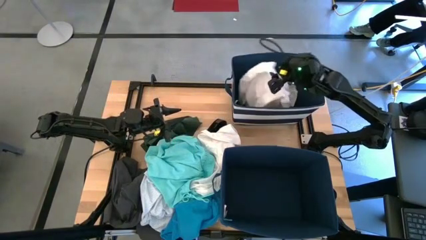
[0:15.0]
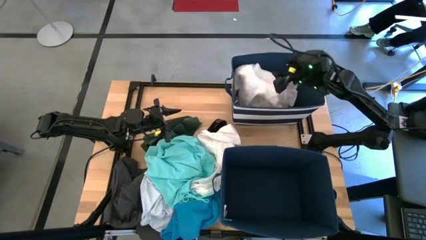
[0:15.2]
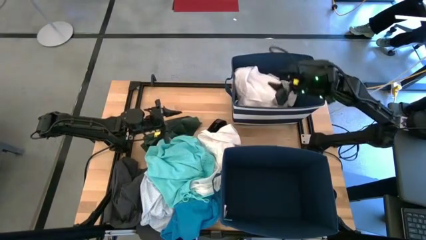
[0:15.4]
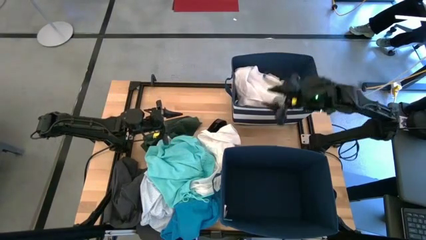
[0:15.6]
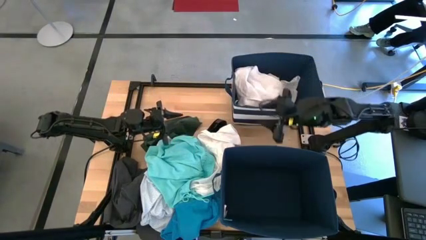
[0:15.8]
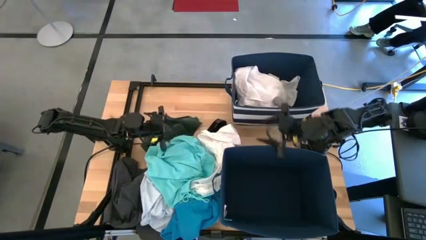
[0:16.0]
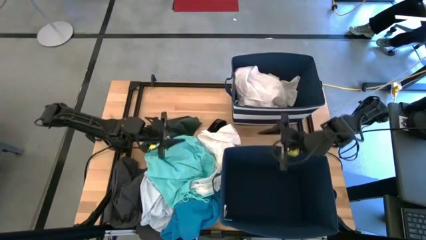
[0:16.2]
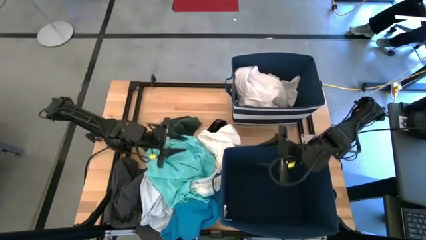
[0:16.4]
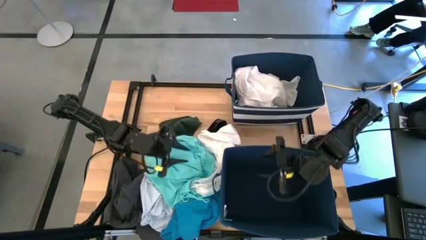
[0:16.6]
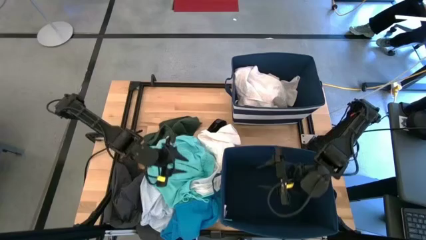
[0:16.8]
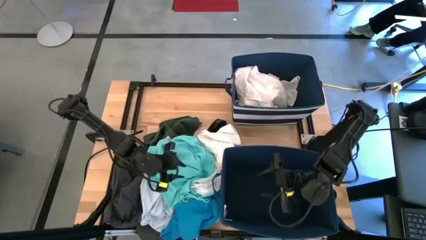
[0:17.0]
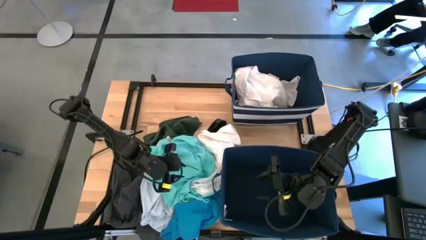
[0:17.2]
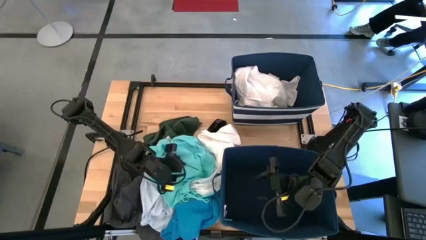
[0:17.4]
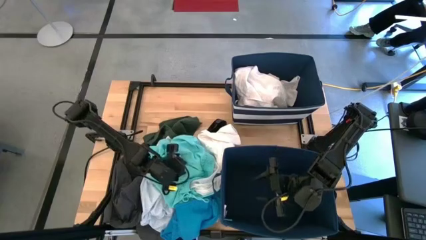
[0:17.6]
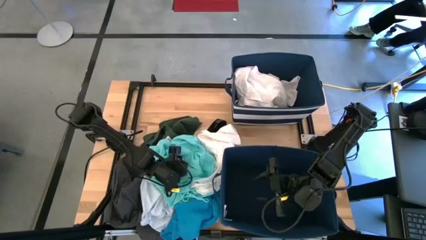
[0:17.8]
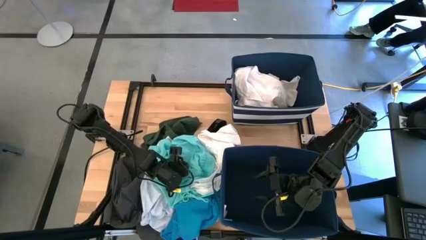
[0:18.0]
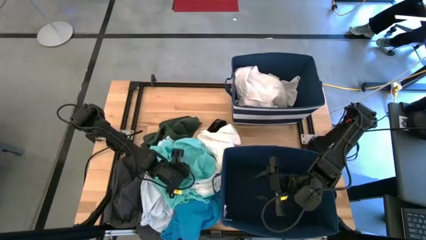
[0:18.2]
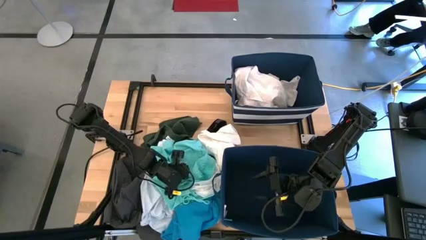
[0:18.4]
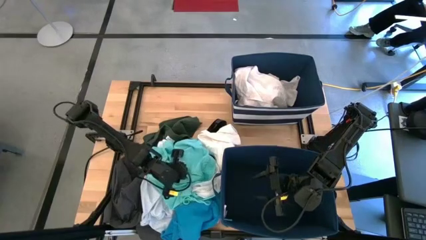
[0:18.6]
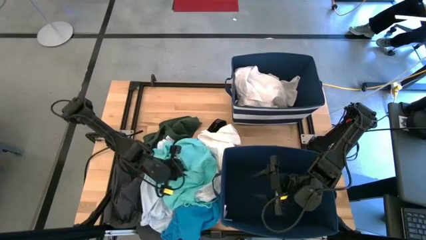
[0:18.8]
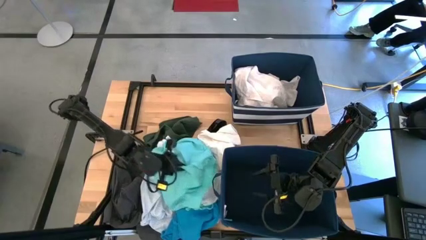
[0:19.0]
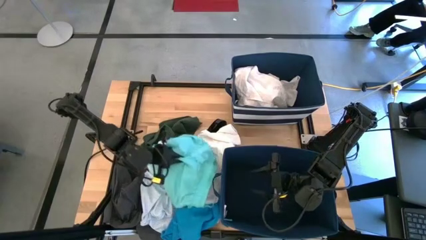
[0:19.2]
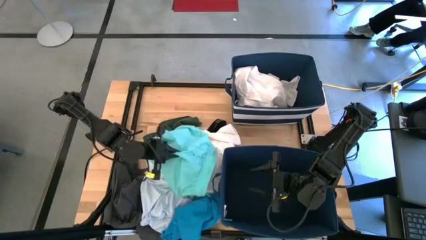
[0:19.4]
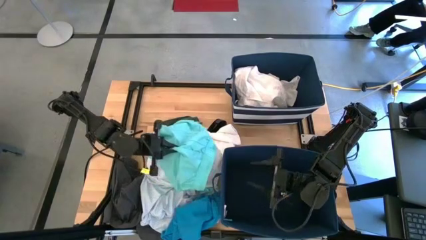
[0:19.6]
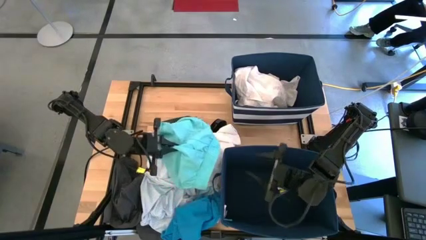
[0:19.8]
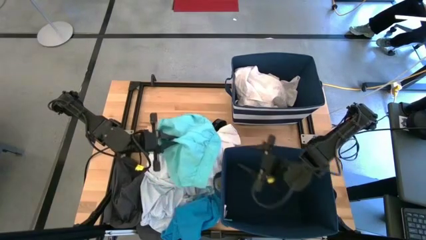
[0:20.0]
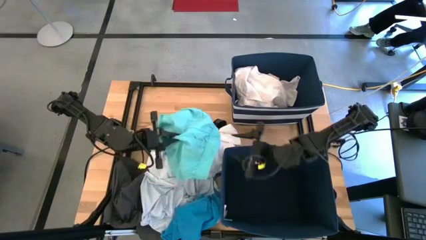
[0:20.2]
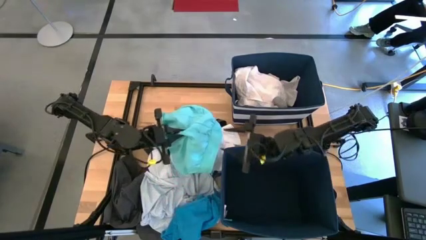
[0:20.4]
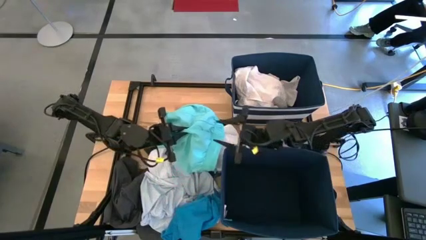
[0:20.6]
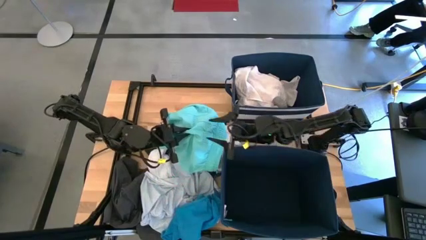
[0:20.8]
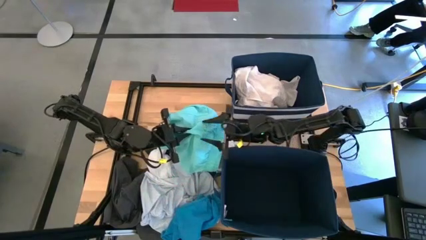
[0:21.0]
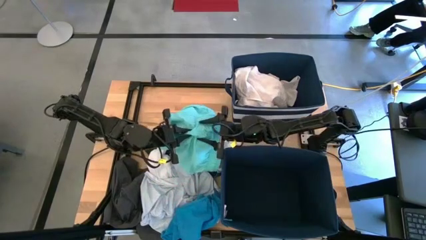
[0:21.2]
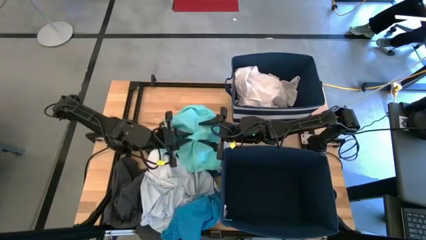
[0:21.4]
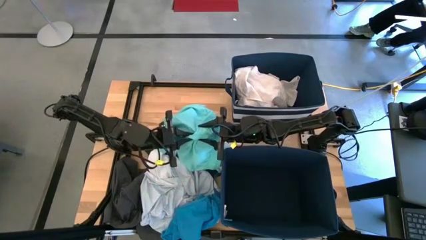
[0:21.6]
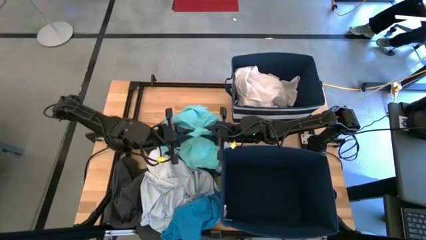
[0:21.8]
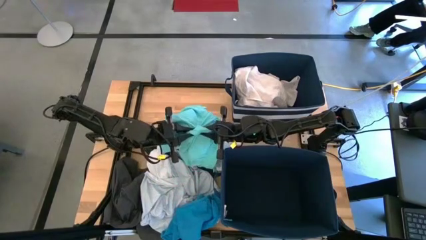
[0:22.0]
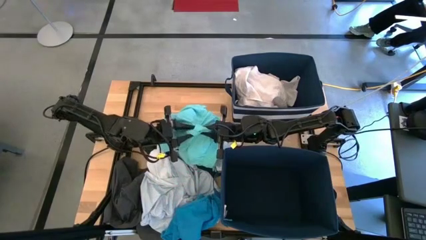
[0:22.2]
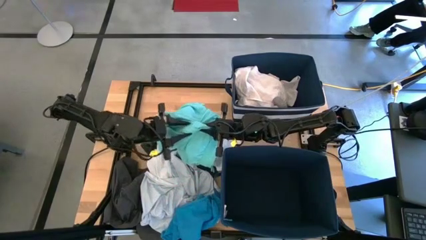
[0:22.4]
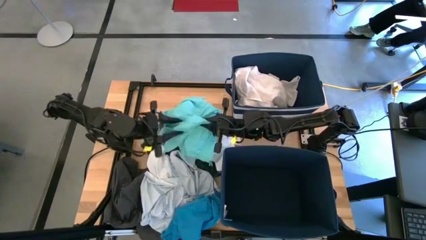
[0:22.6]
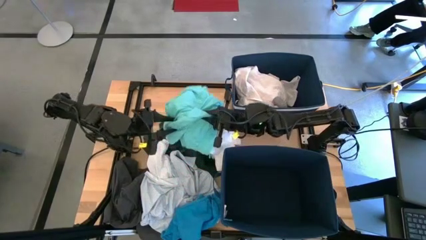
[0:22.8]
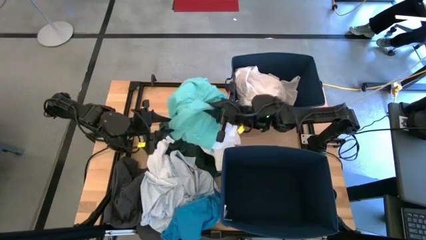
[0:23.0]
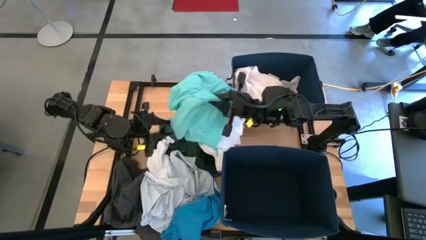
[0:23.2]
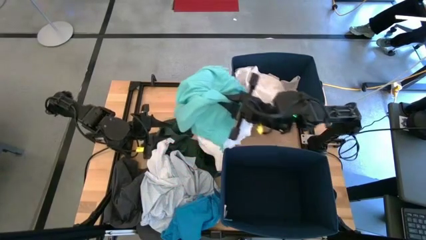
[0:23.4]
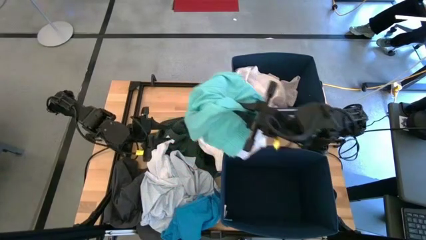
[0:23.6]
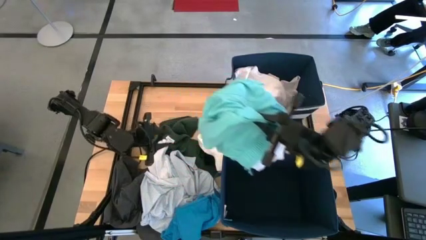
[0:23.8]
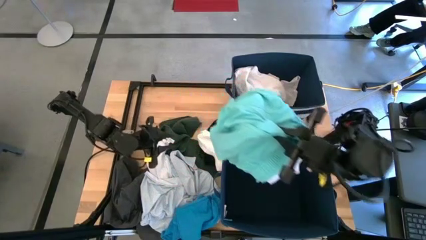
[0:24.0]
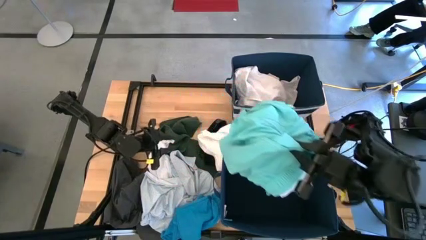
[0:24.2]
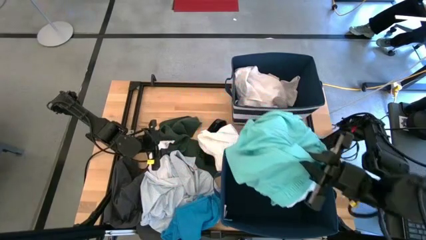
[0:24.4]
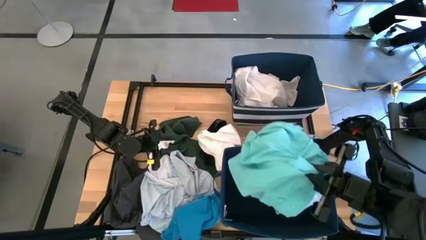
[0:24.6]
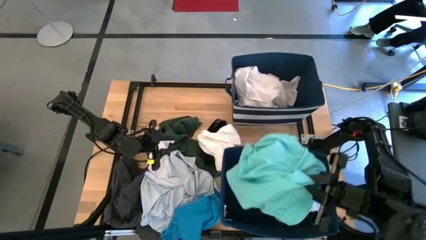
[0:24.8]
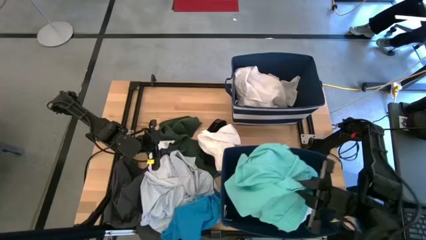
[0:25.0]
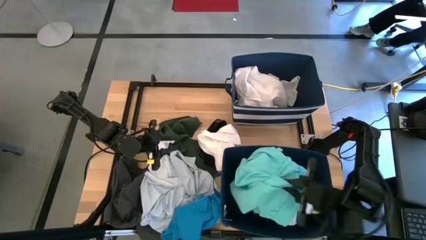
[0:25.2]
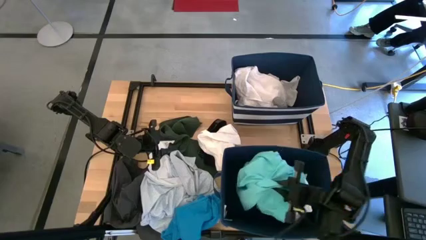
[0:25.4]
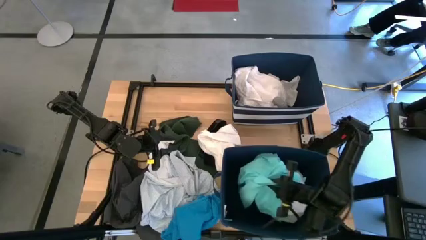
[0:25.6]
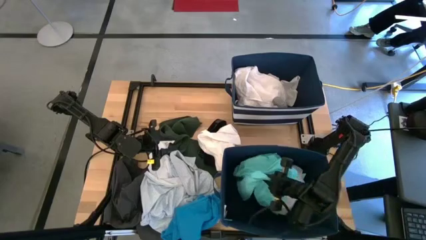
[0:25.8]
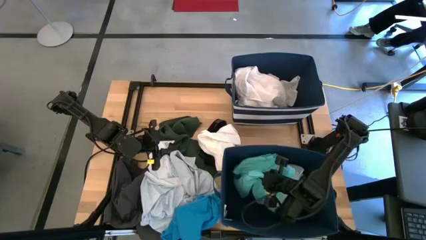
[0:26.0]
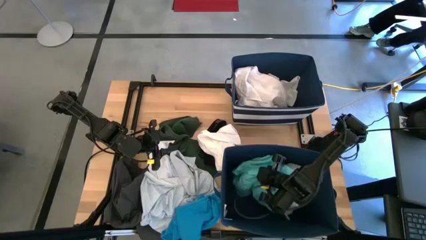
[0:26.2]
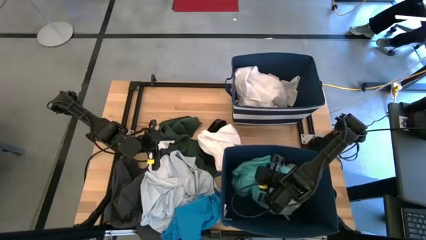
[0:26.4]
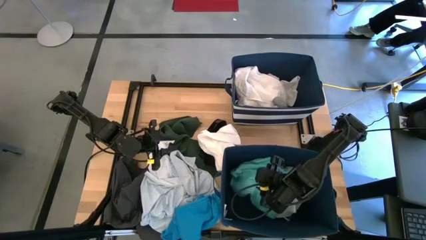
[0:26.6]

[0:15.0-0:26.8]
Task: Sort clothes
Put the light blue shorts into the bottom blue bin

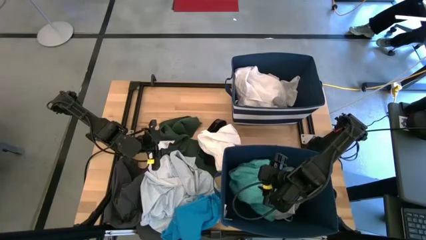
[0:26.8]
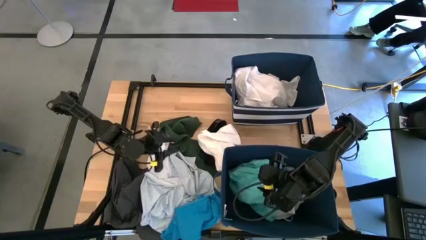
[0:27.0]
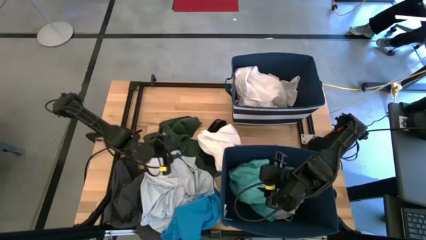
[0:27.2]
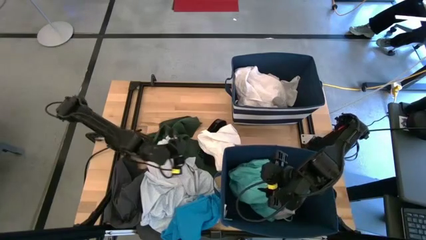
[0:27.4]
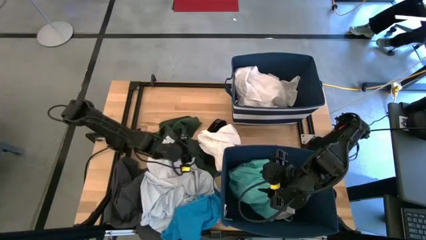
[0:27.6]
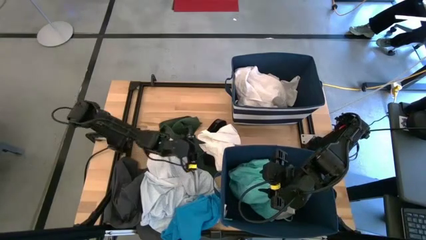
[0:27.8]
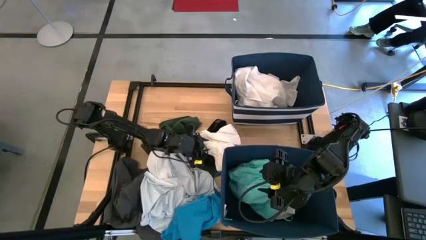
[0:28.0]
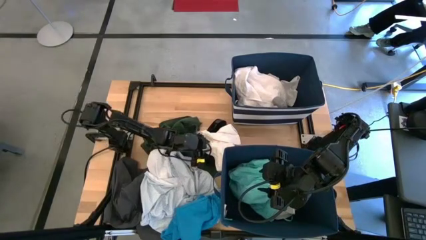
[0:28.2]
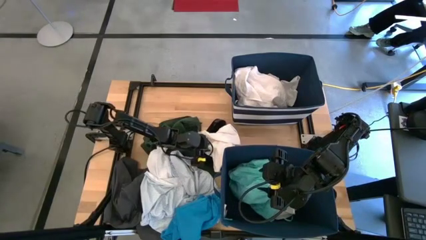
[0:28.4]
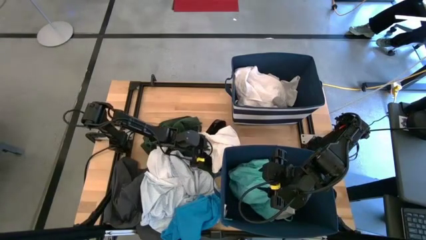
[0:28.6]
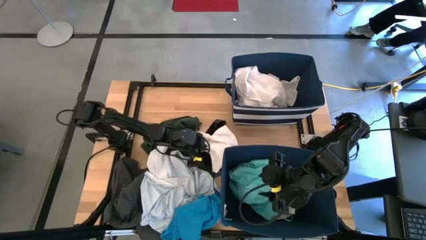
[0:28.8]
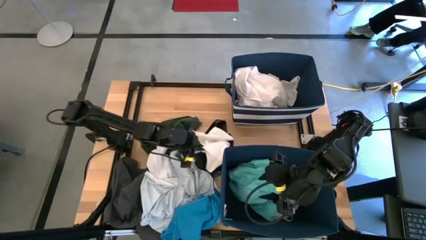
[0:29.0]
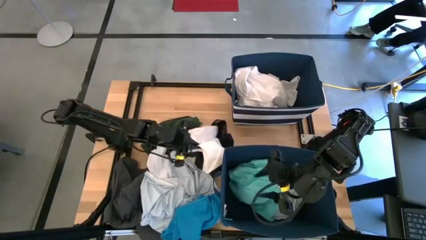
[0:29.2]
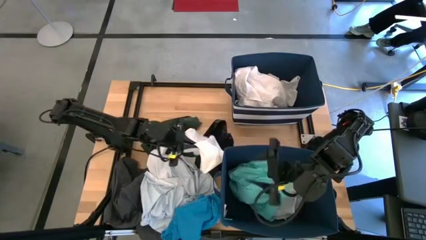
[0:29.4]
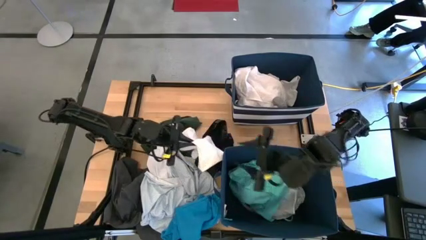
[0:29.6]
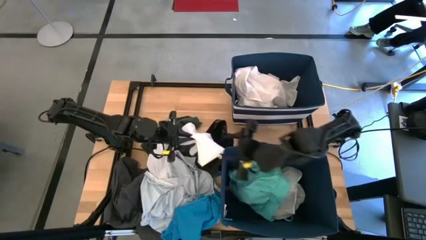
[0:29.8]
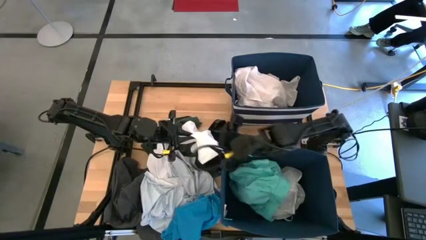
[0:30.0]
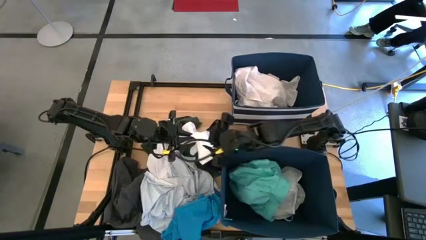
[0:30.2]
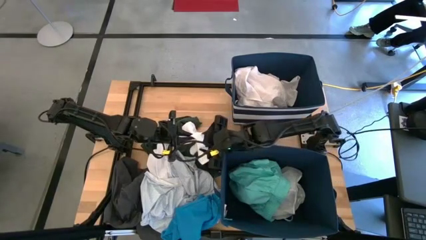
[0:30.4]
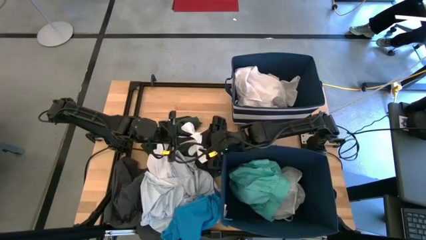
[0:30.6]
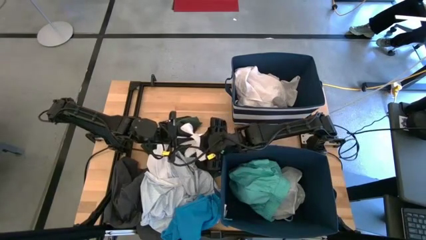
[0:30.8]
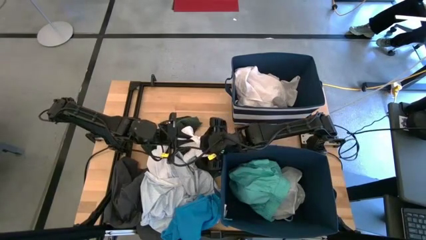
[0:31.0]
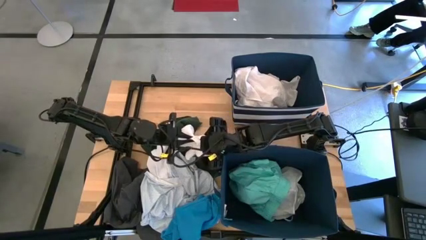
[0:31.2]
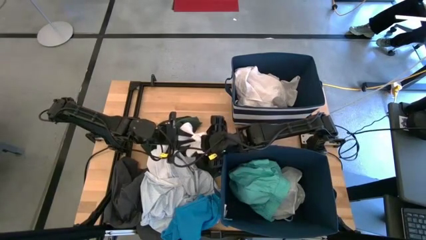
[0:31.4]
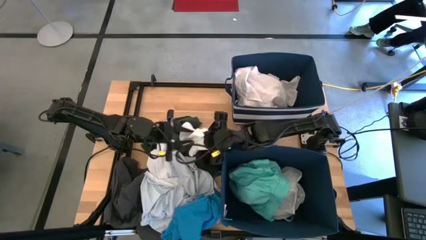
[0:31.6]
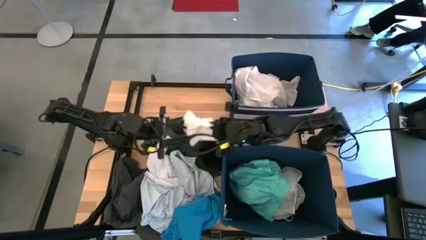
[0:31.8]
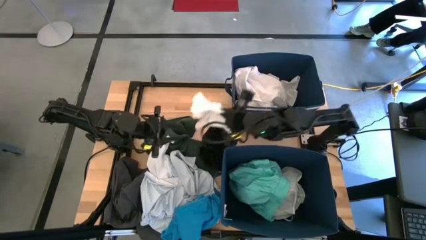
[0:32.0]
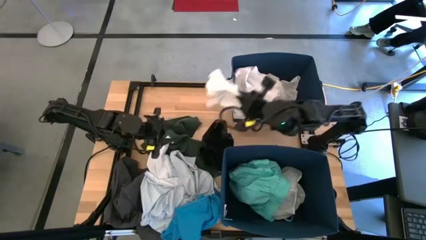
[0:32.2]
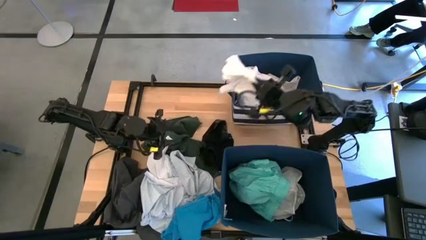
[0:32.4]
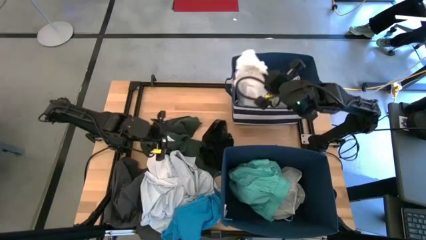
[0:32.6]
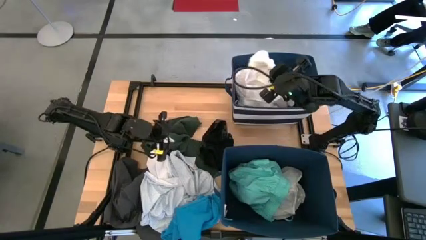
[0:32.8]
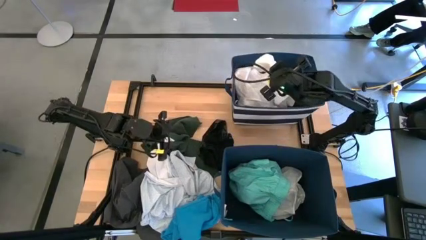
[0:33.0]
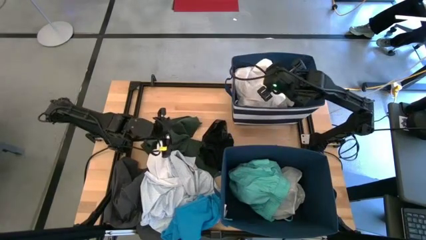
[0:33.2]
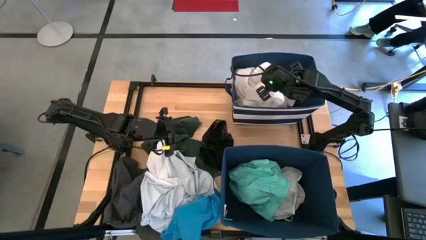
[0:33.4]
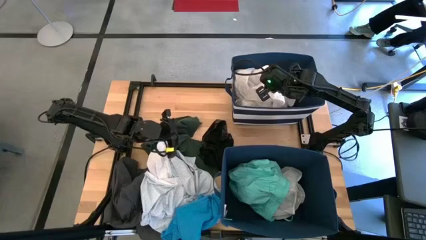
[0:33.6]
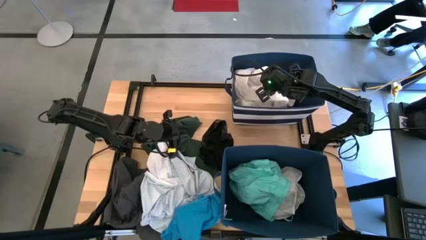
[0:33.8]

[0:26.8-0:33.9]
Put the white pants into the top blue bin
